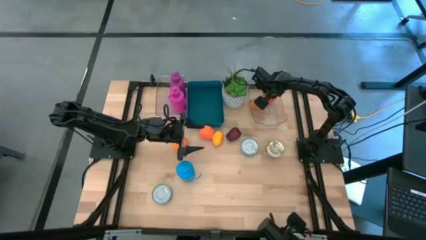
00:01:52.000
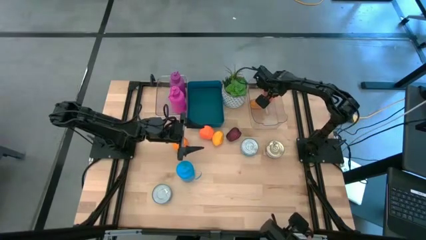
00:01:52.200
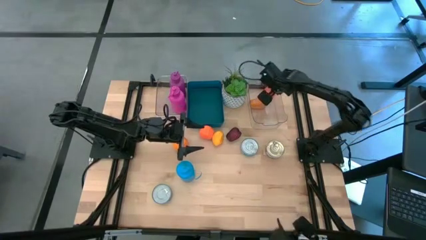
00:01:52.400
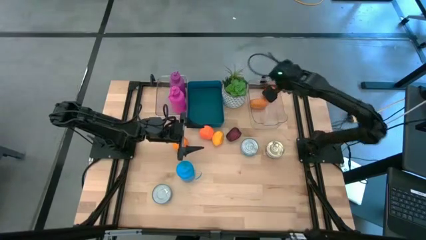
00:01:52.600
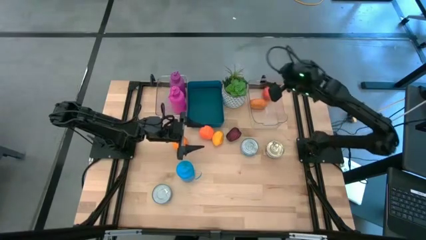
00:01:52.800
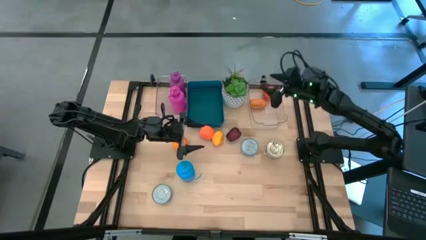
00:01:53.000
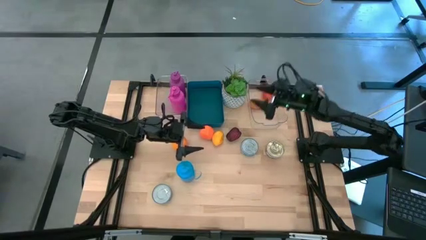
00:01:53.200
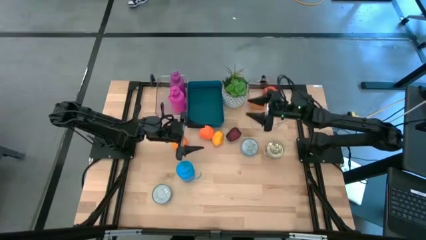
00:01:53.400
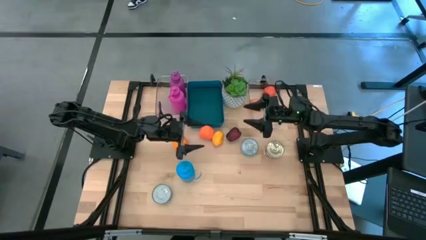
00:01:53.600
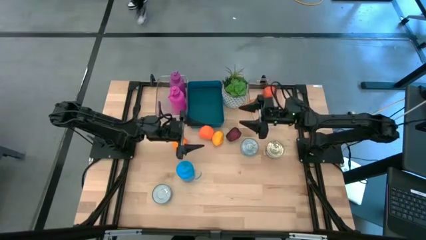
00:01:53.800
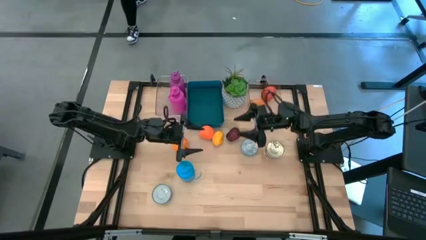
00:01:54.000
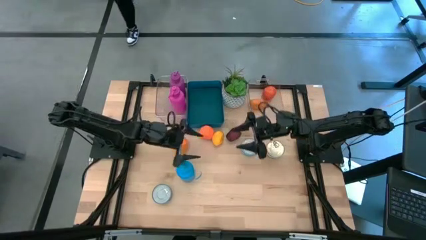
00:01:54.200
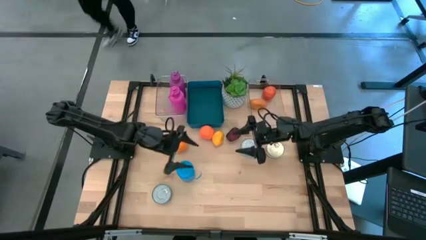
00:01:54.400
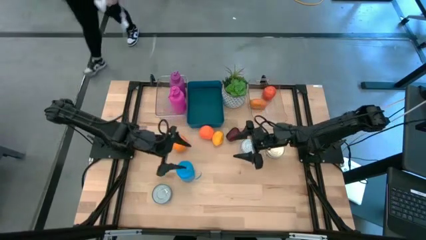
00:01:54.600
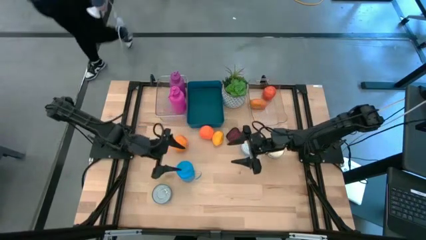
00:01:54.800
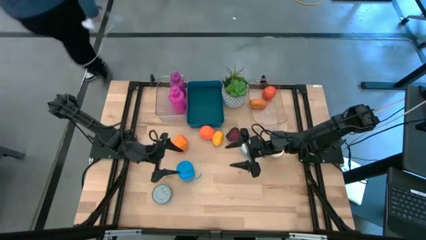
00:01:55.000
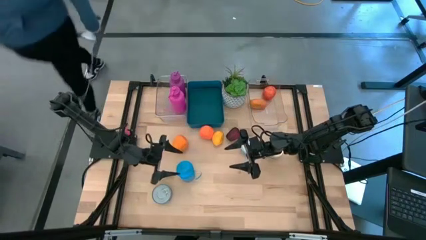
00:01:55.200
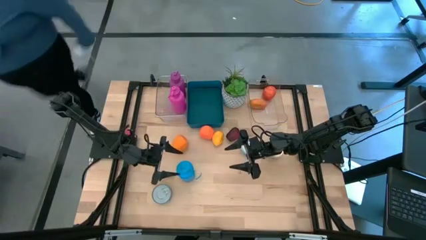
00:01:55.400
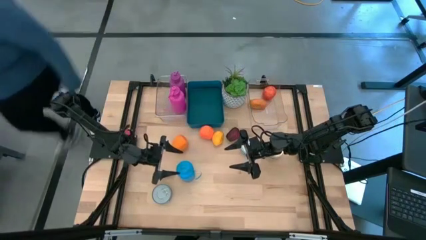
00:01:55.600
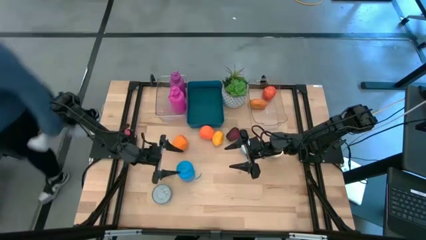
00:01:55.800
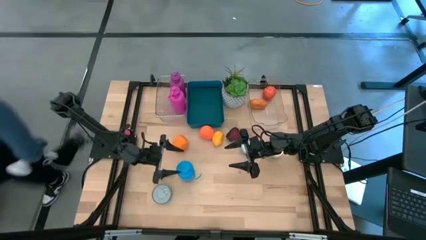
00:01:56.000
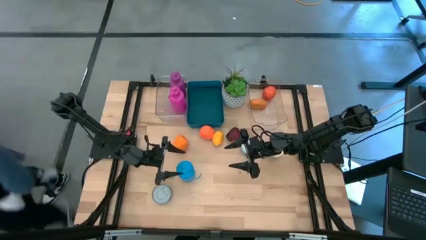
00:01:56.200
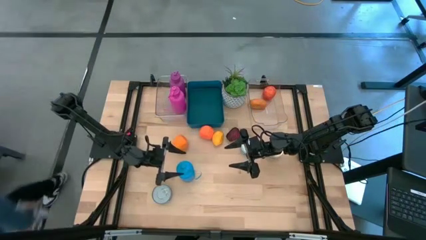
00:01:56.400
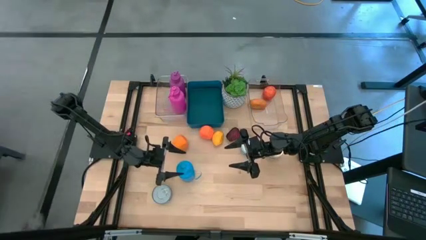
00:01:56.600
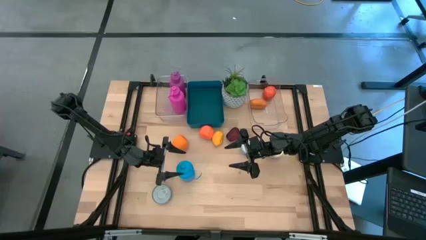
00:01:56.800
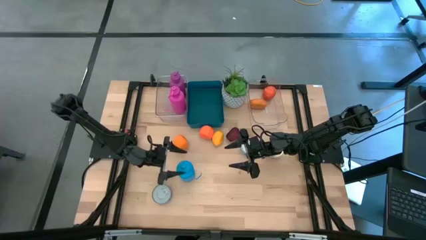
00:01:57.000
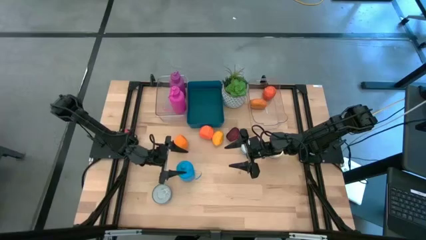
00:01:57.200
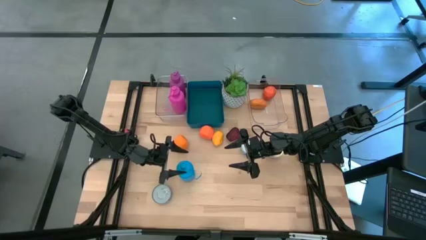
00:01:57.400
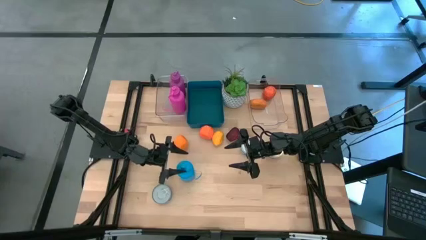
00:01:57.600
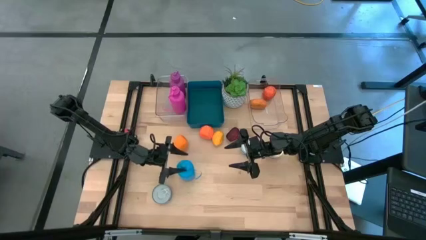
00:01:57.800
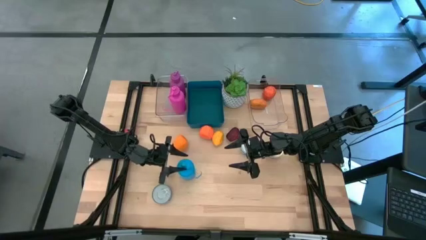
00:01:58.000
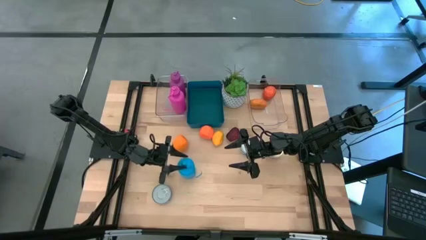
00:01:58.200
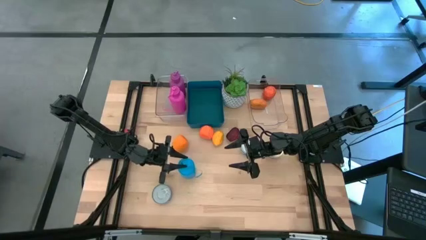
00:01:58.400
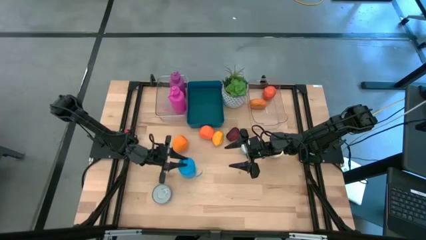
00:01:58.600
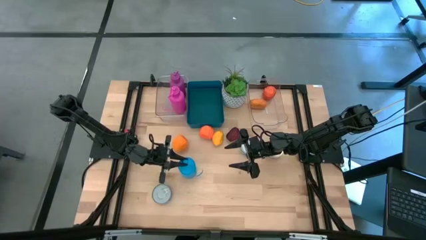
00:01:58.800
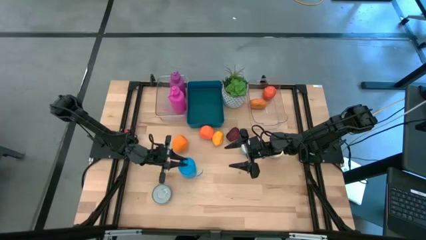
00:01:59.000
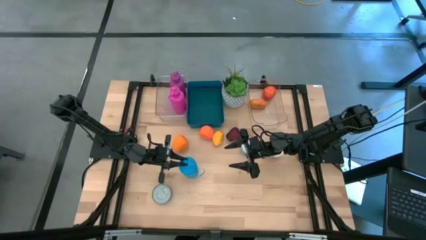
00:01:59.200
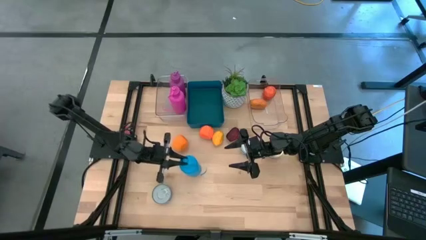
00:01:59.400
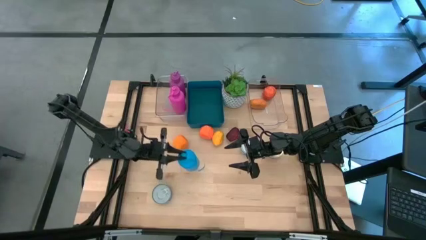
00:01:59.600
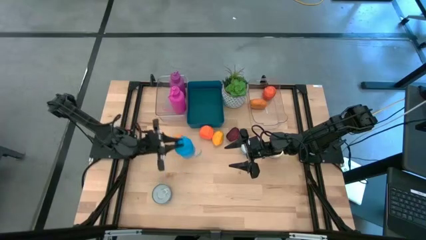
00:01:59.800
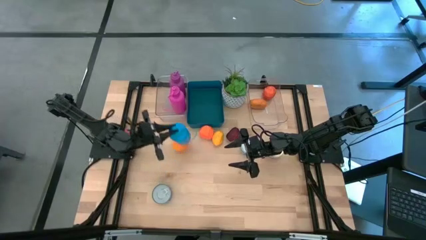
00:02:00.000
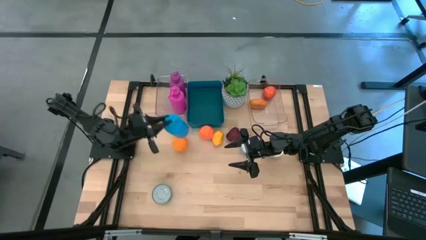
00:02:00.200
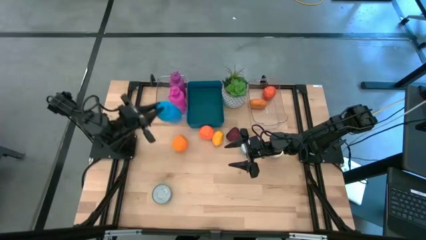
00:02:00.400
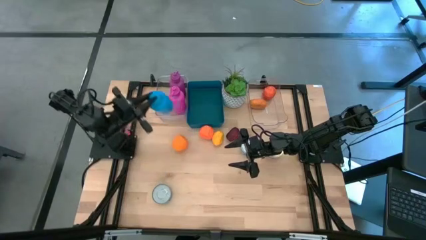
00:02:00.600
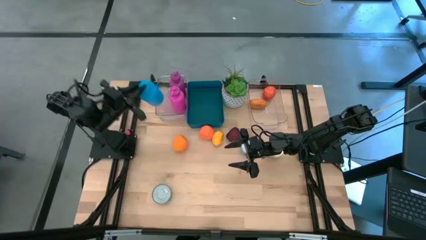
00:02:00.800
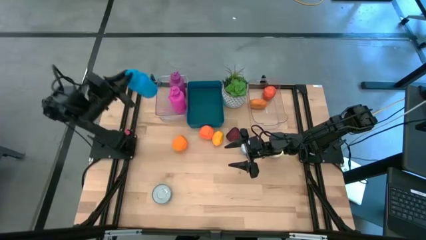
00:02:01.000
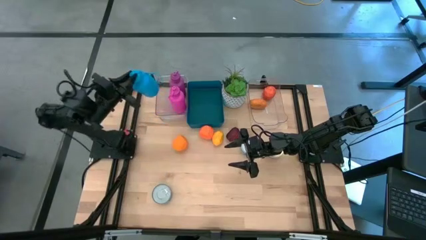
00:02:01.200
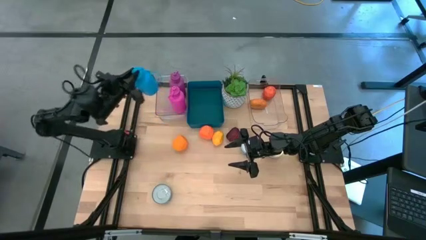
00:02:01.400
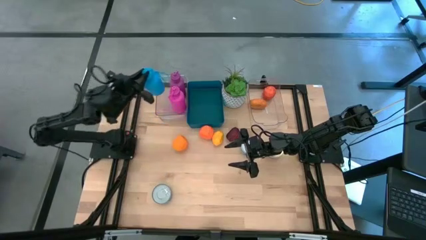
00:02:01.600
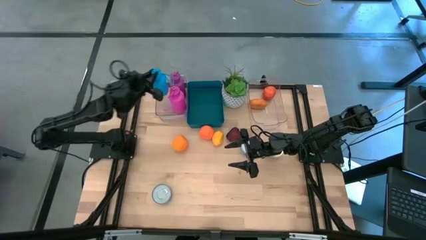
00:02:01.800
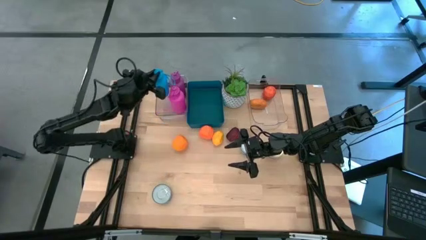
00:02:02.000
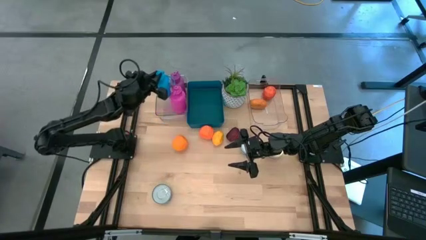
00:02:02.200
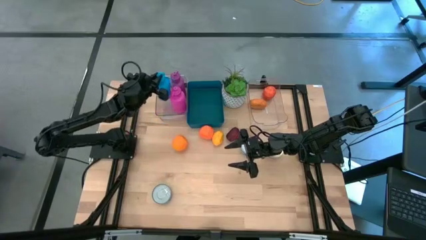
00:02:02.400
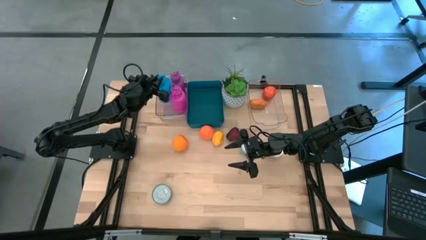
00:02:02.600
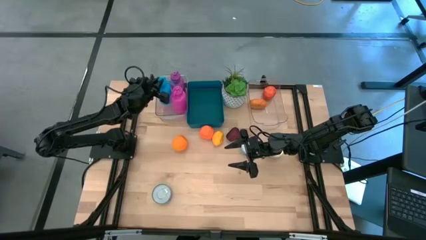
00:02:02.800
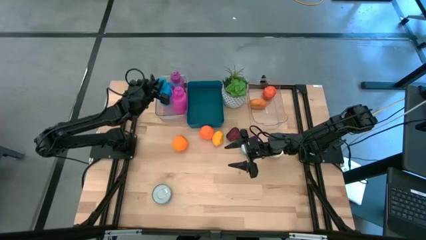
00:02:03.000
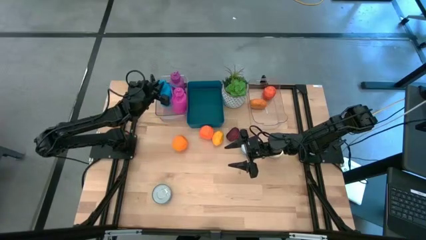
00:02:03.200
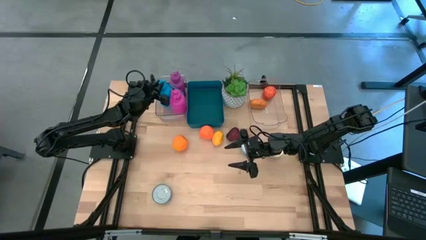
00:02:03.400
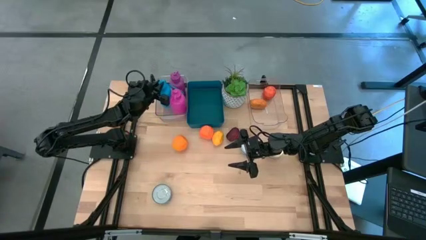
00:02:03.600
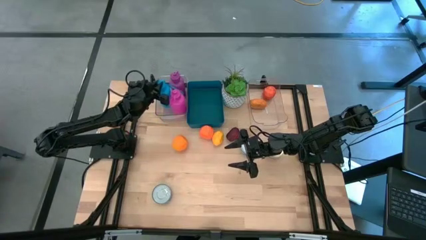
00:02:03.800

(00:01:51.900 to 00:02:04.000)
Task: Pick & Place Food Item
Put the blue water bottle into the left transparent bin

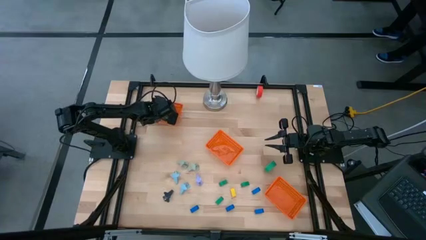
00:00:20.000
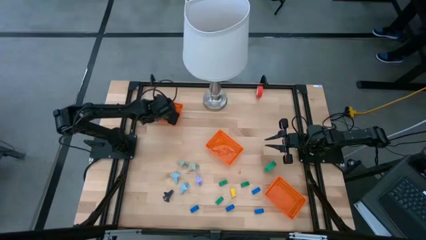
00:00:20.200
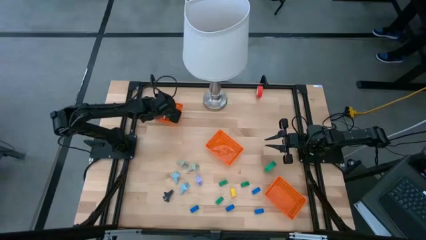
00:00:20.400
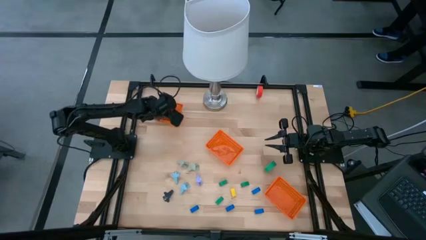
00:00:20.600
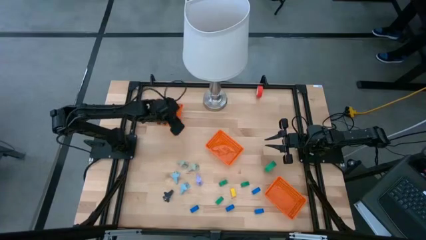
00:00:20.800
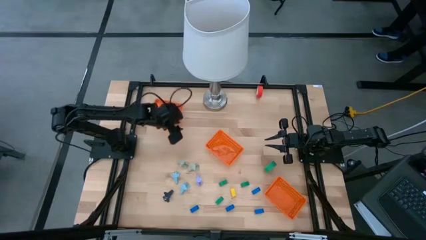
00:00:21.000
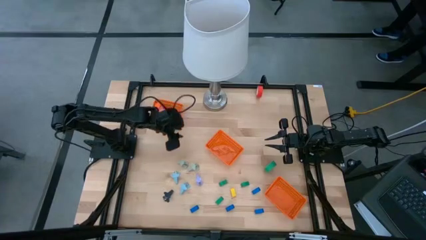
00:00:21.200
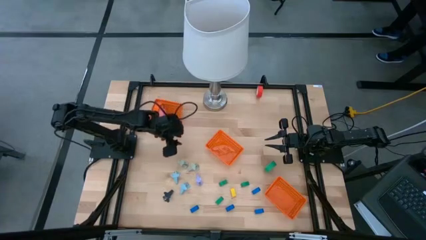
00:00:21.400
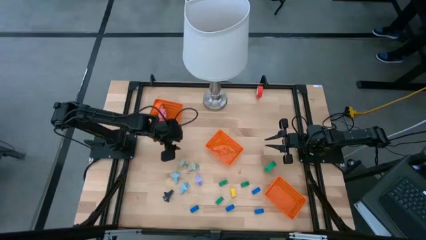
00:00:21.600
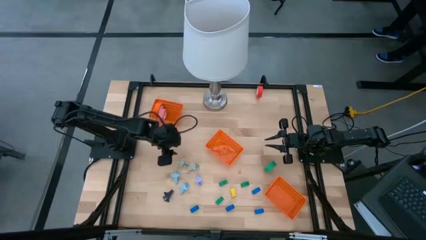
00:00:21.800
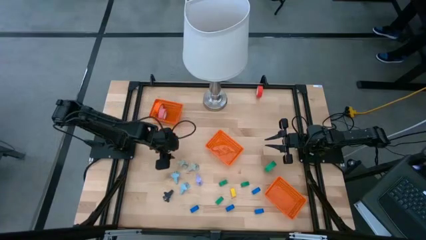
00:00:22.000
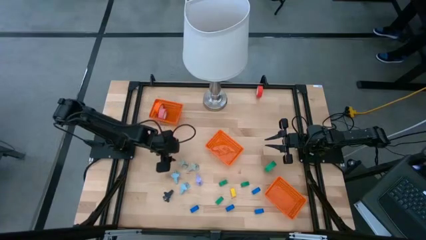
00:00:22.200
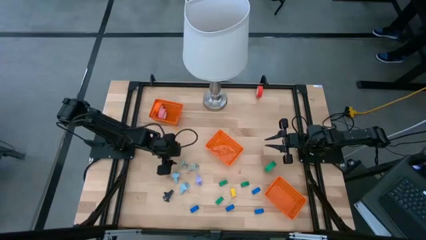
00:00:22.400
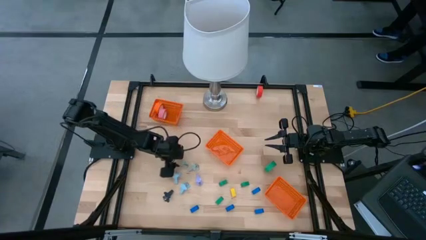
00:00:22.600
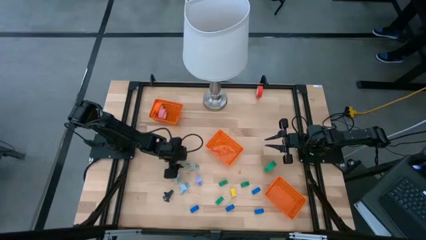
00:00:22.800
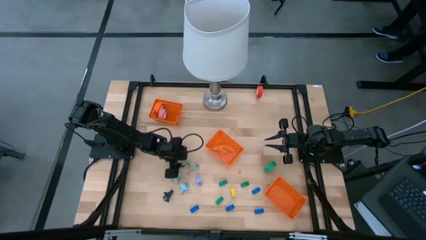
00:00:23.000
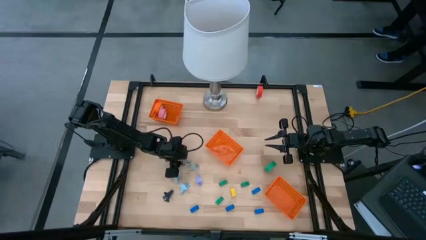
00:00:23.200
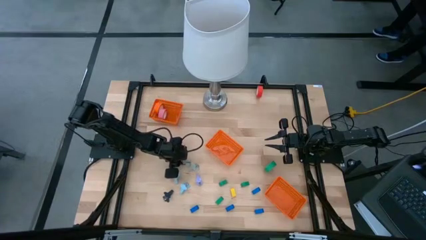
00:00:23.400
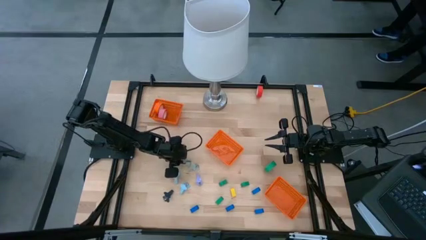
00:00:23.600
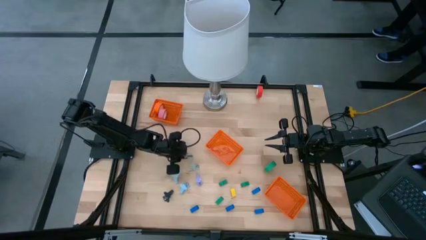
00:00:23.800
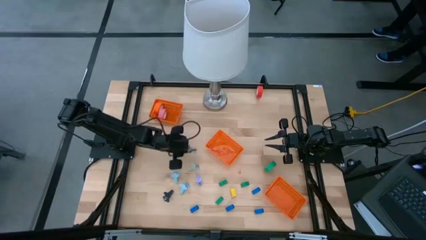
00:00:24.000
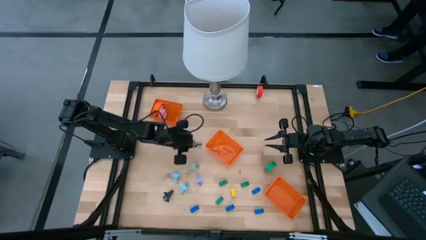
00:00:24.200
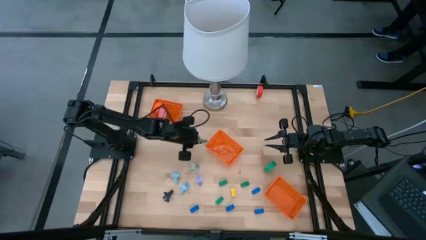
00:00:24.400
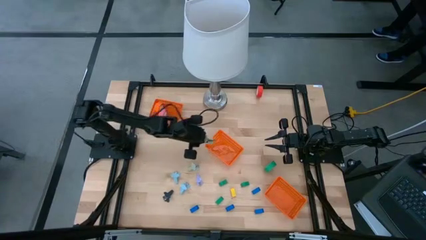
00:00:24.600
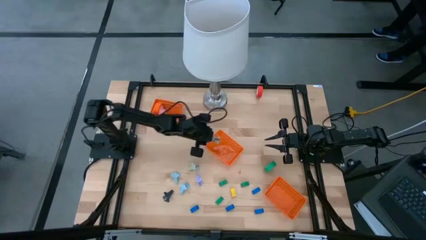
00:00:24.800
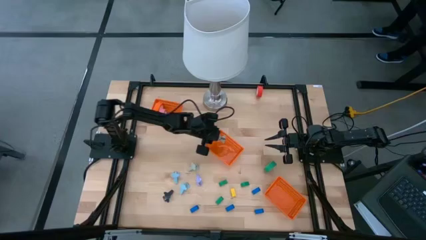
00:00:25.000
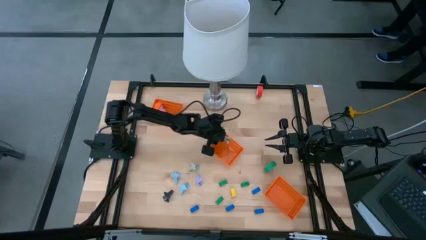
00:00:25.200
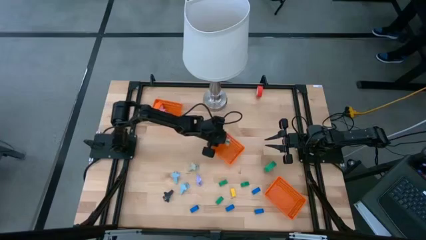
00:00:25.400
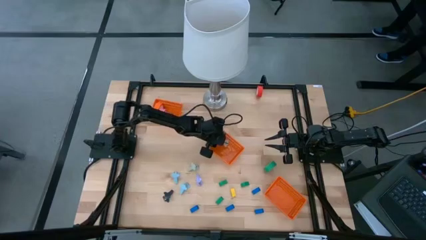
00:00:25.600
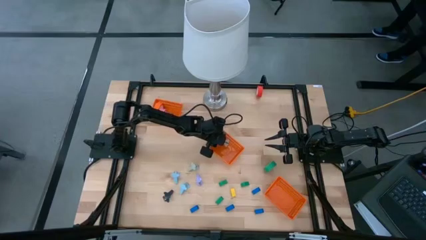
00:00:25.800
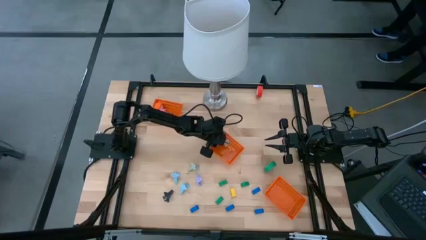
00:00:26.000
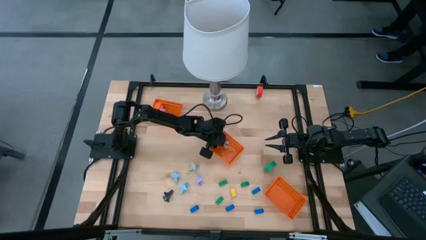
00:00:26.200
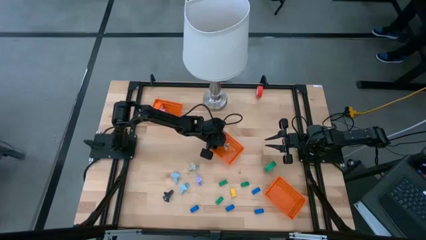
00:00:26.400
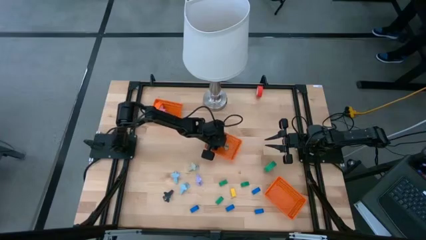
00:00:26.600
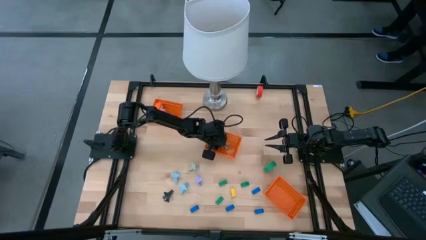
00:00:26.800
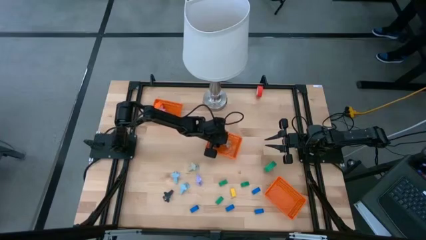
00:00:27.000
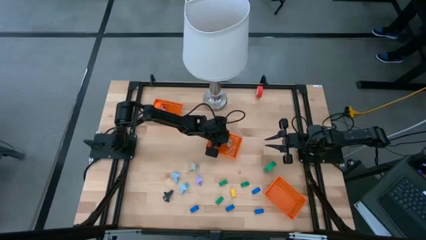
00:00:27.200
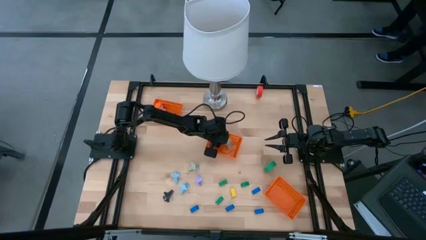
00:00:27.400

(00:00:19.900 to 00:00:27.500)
Task: Pick and place Stapler, Stapler remover, tape
Put the gray staple remover into the middle orange bin
